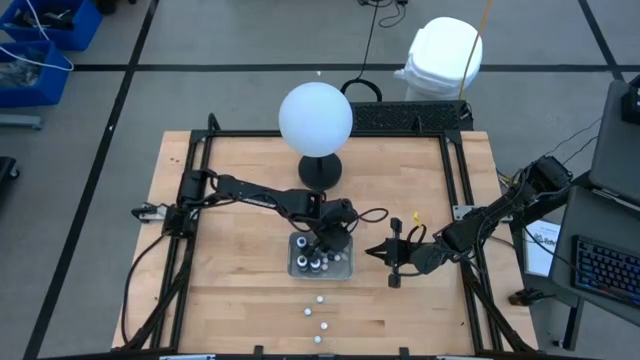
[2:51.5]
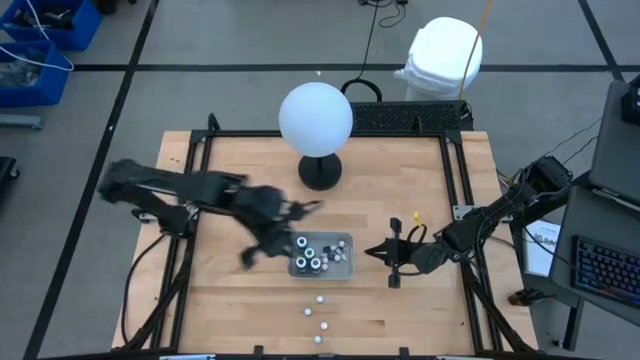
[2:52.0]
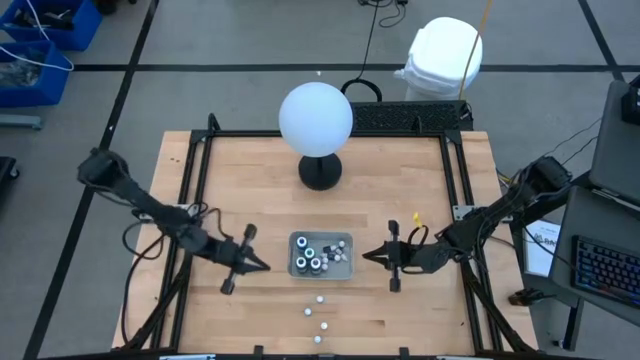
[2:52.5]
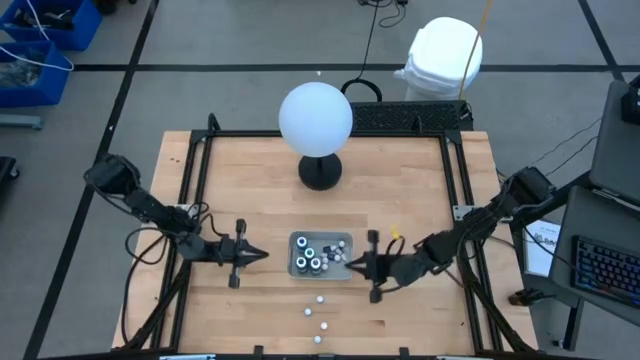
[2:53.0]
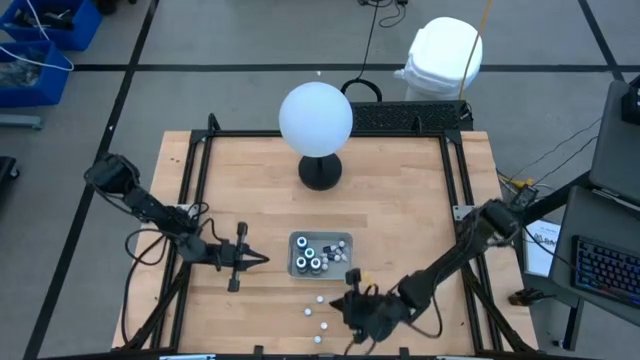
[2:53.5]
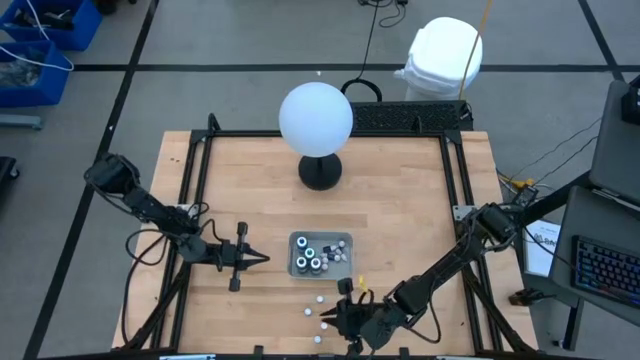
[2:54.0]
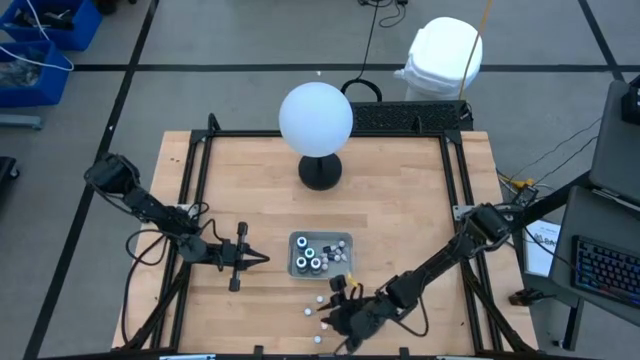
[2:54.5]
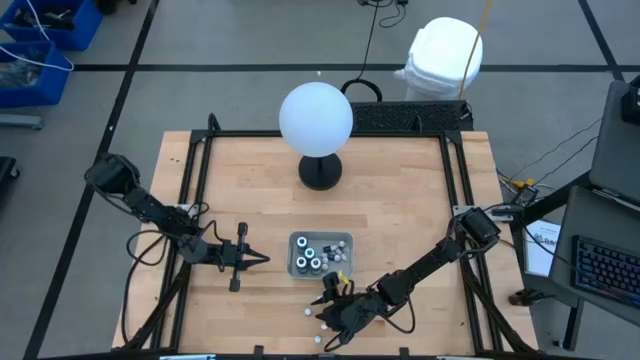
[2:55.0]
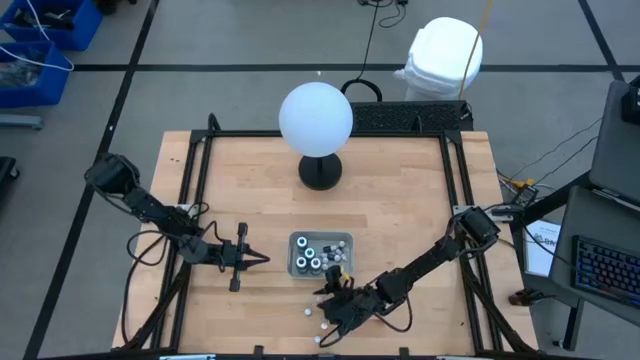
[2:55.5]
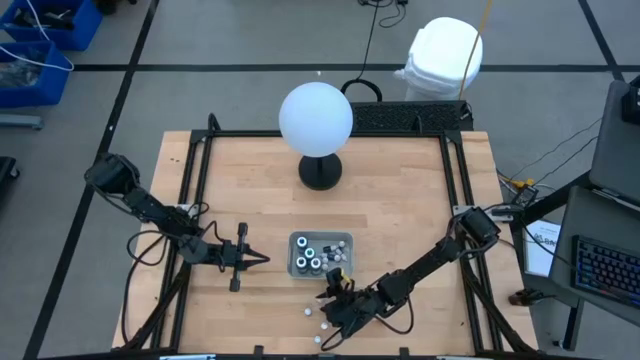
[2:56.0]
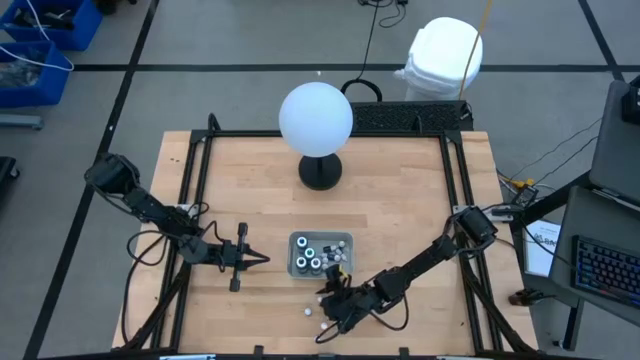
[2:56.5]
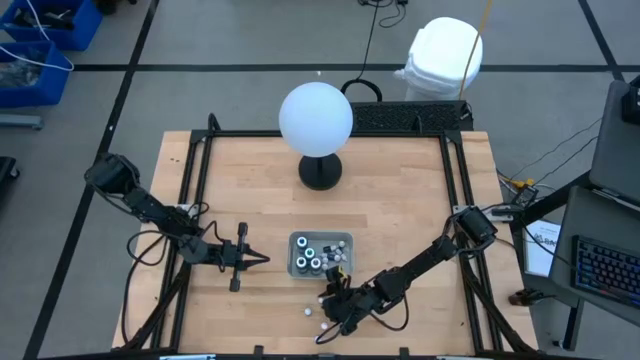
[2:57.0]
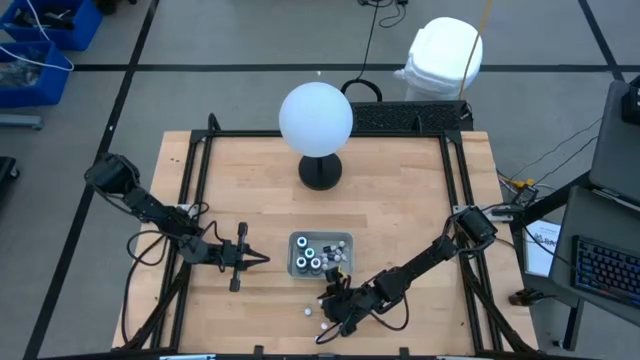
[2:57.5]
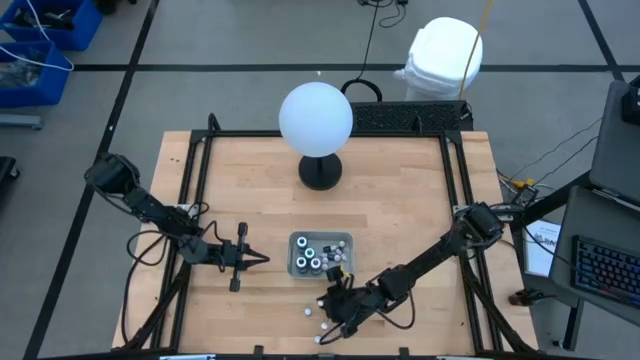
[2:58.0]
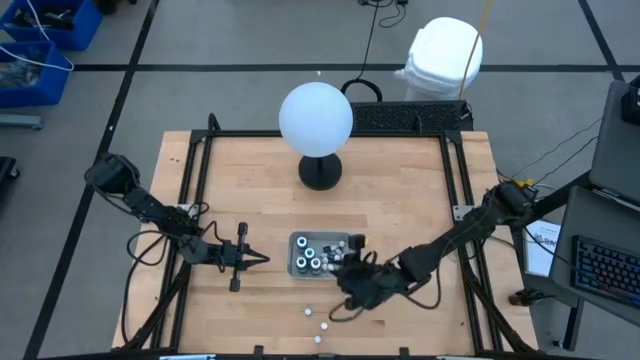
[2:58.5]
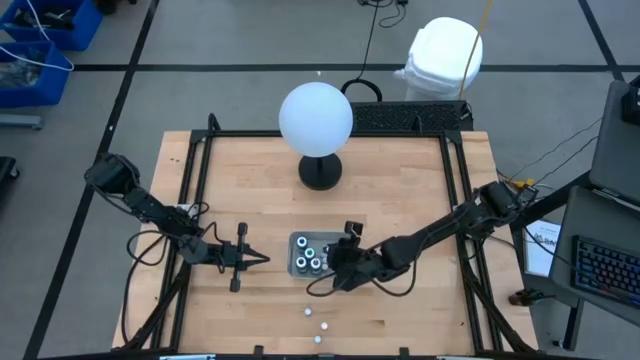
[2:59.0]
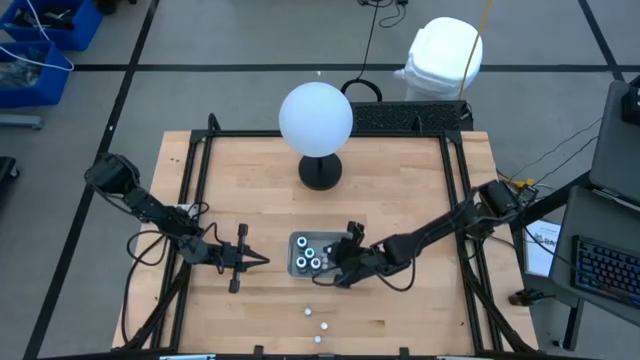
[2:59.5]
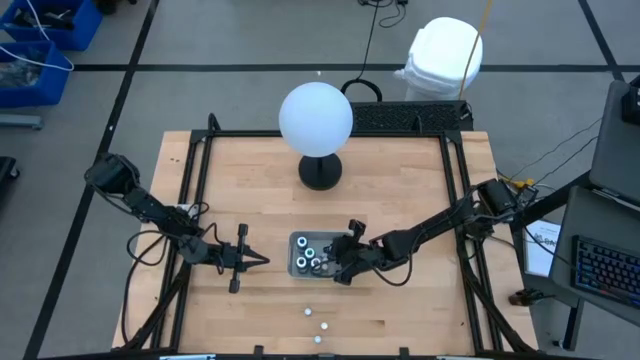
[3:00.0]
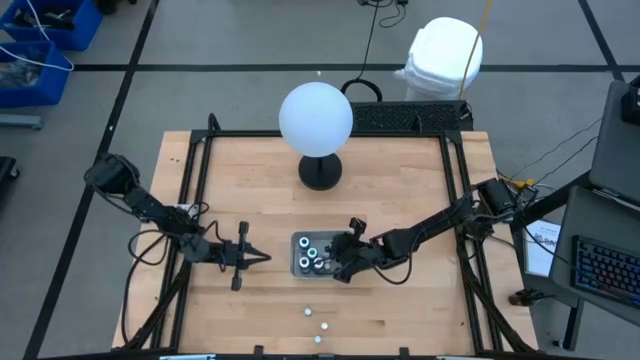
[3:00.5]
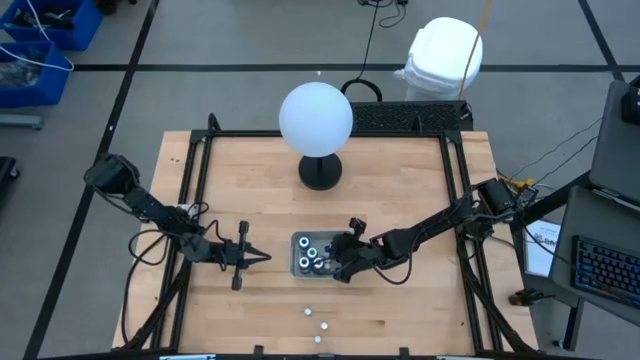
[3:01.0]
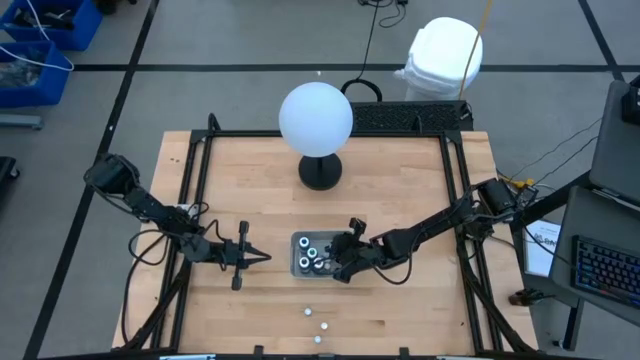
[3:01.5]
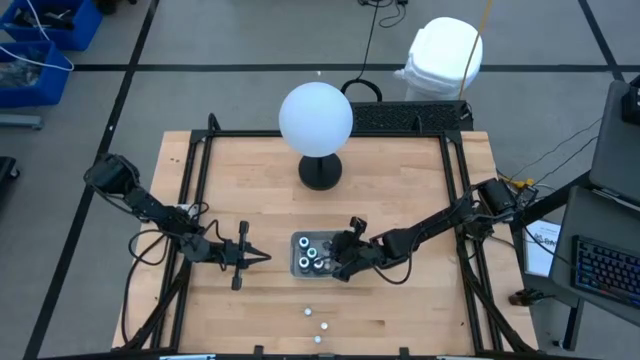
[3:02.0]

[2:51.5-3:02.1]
Task: Pick & Place food coloring
Put the small orange food coloring bottle into the gray bin

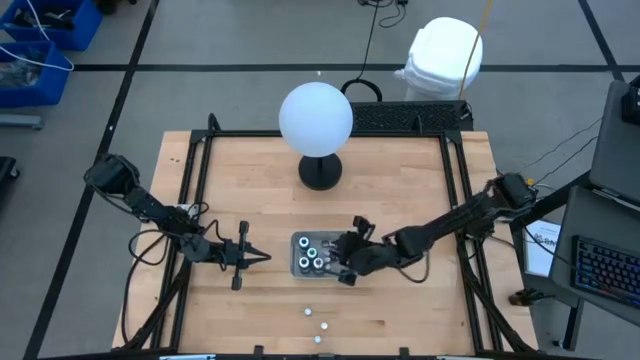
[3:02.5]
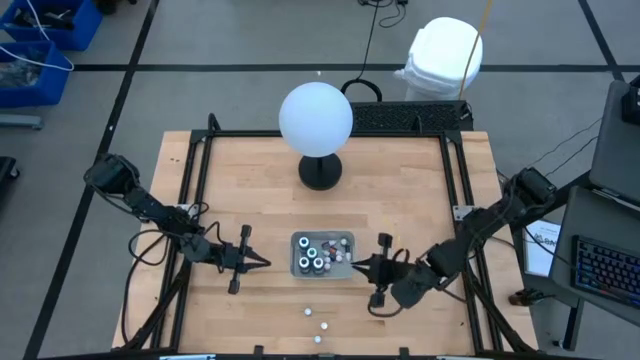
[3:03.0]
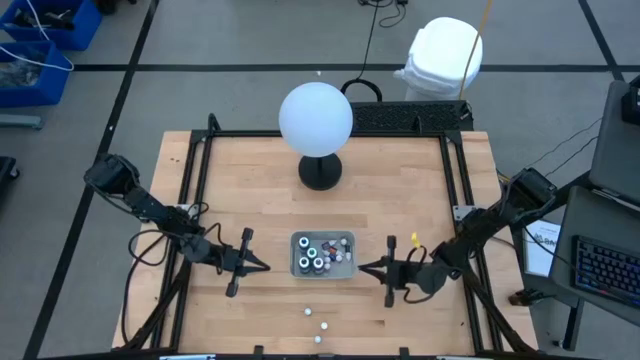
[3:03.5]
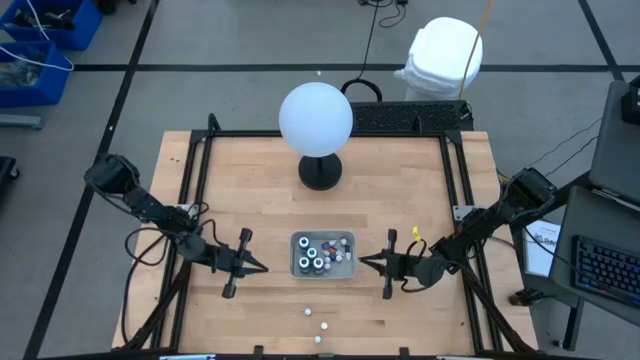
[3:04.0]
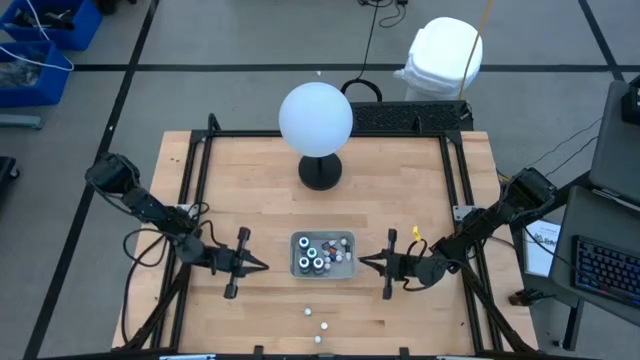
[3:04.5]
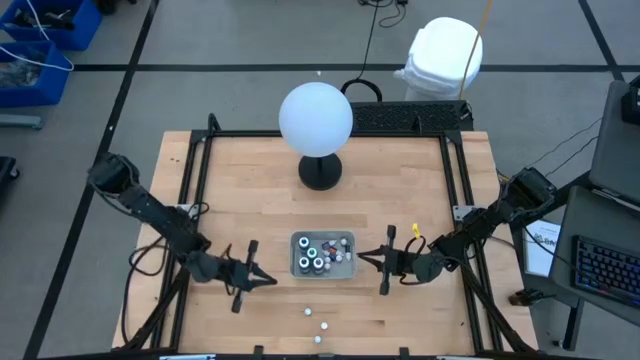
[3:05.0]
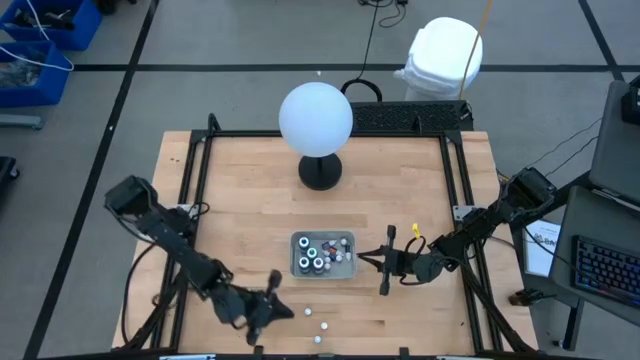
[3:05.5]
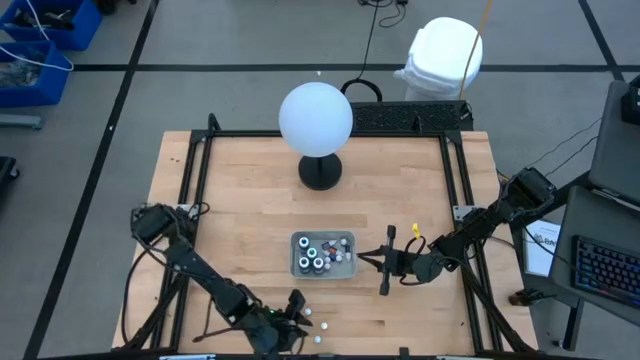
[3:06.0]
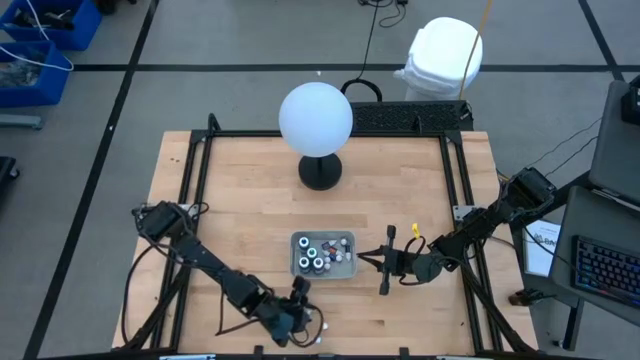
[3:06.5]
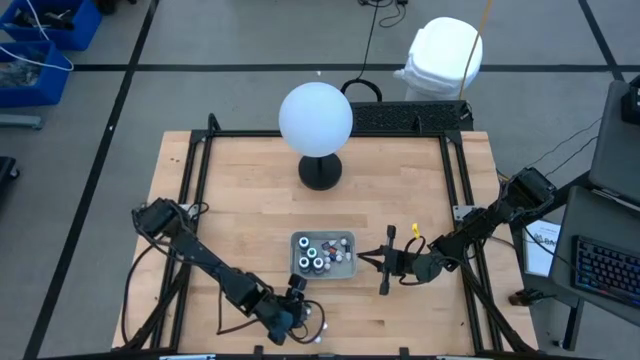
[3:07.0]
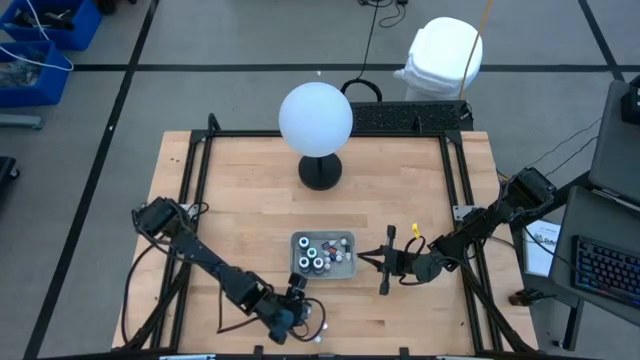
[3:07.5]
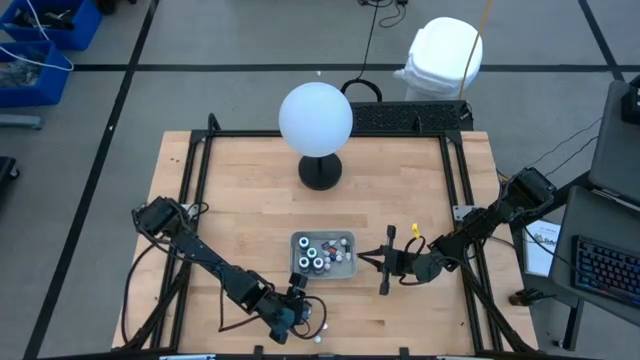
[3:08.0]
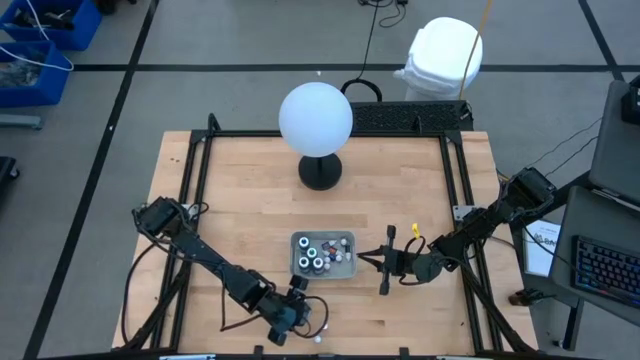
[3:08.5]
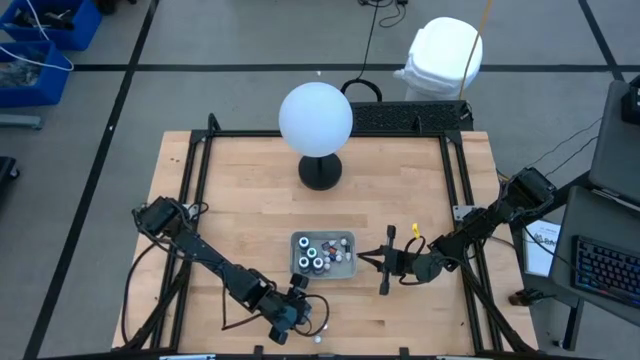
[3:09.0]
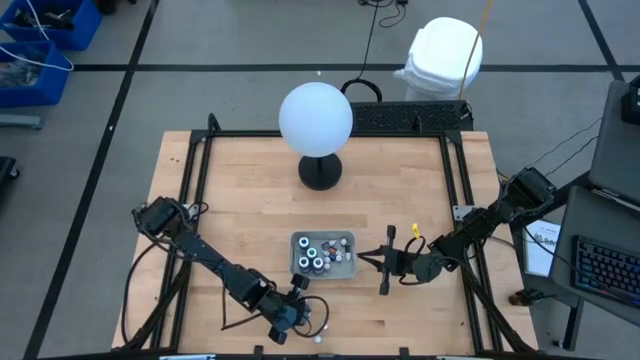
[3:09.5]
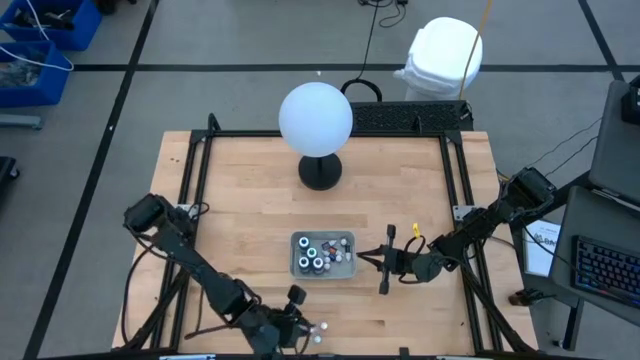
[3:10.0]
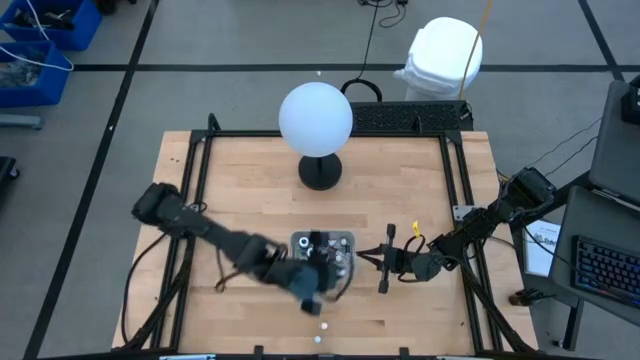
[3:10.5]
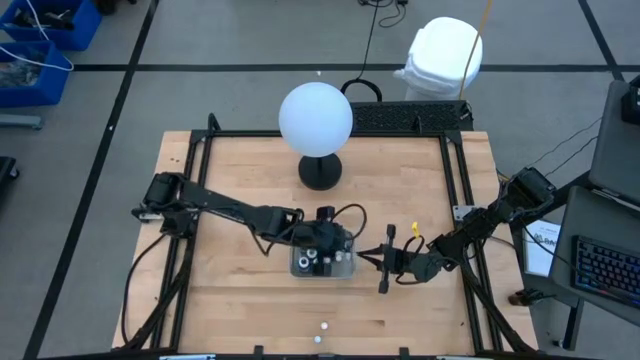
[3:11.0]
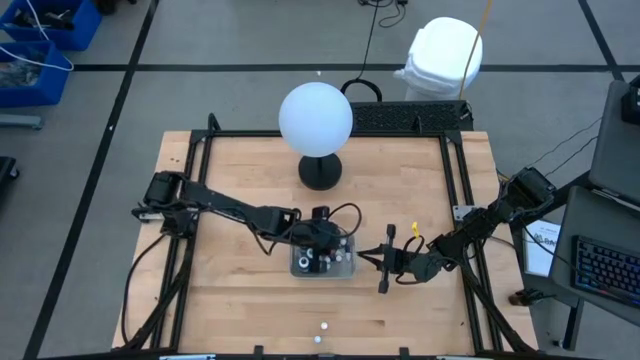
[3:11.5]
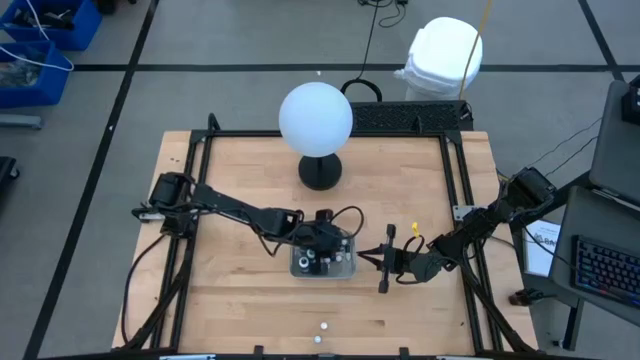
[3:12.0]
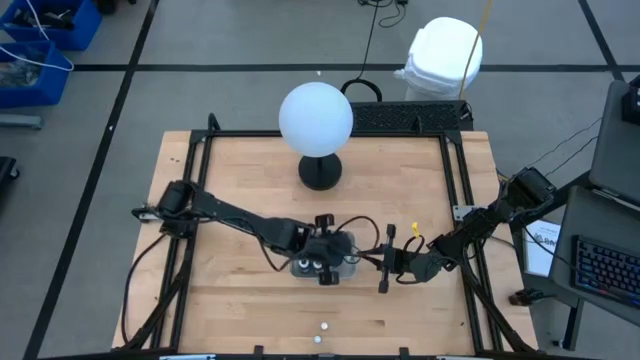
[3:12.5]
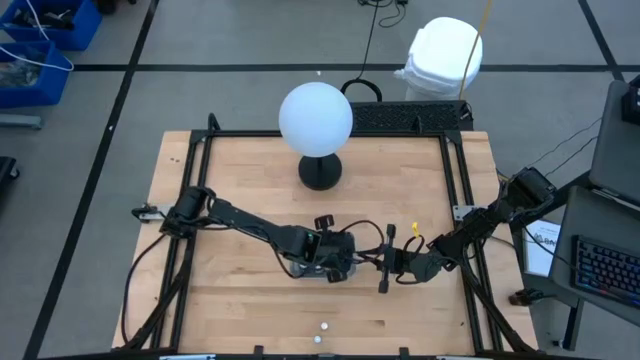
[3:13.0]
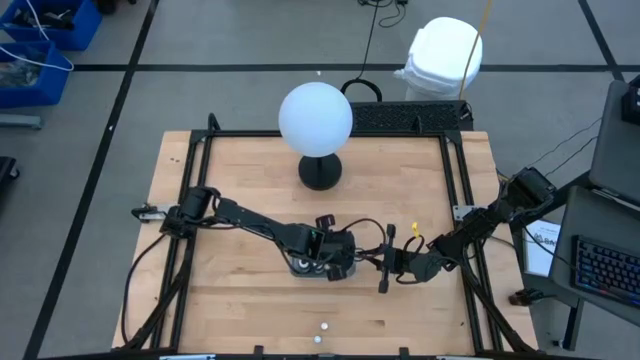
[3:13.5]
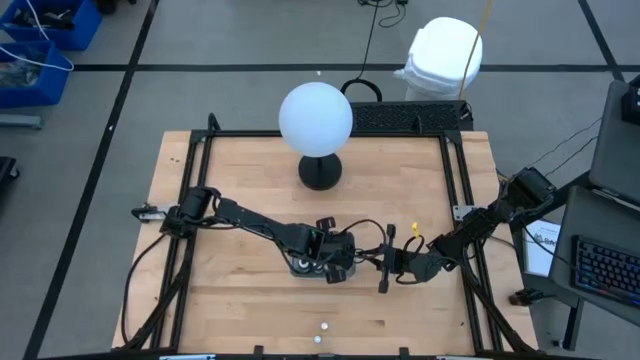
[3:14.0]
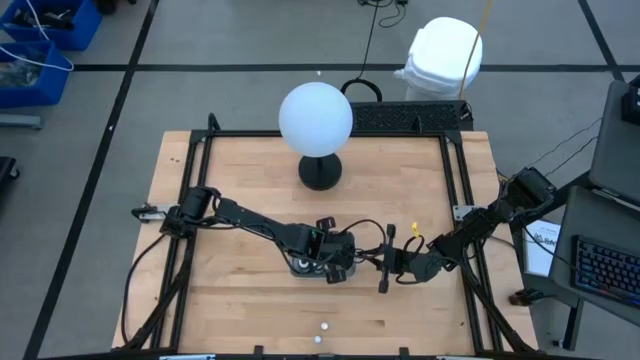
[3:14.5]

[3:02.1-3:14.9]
Put the small green food coloring bottle into the gray bin
